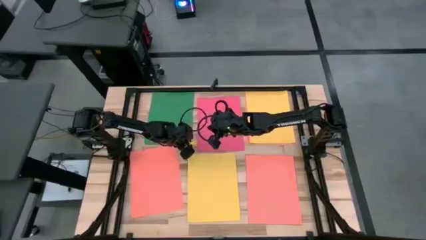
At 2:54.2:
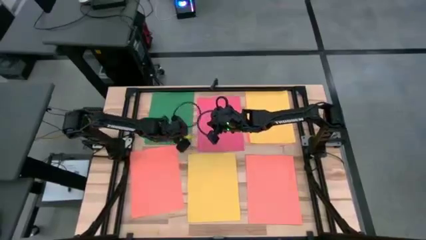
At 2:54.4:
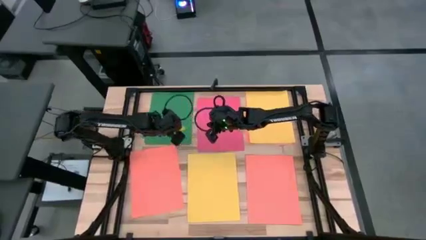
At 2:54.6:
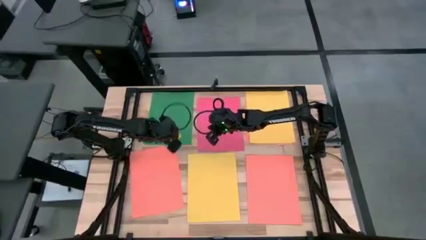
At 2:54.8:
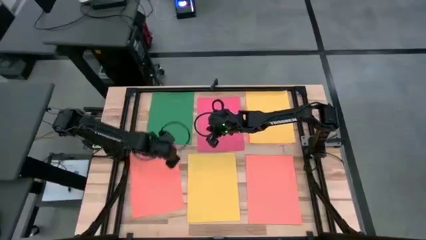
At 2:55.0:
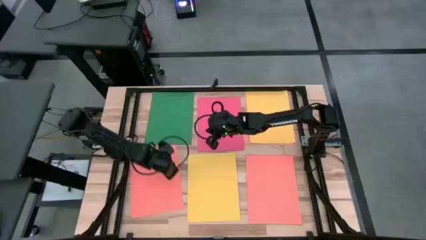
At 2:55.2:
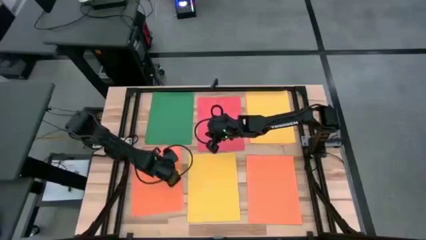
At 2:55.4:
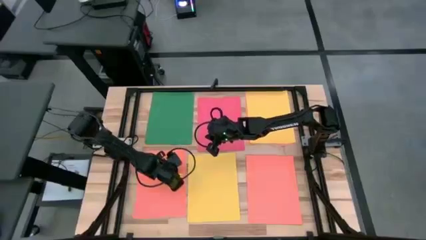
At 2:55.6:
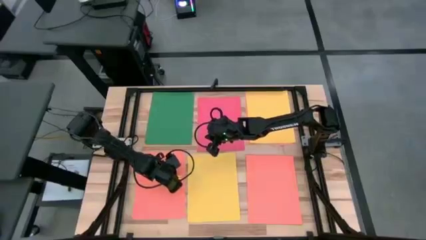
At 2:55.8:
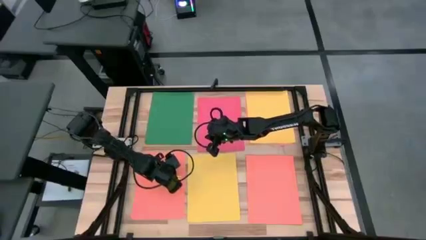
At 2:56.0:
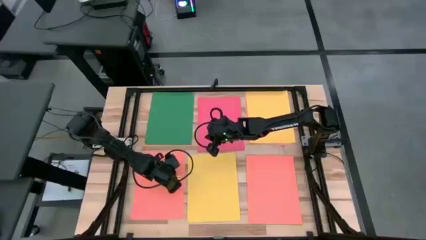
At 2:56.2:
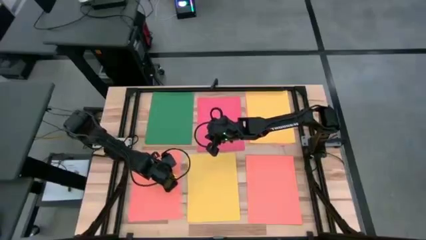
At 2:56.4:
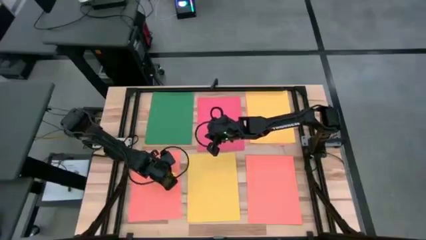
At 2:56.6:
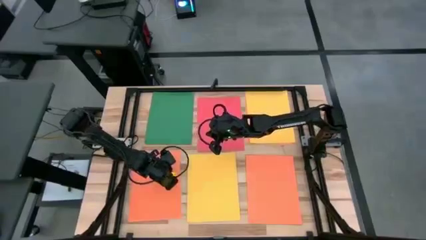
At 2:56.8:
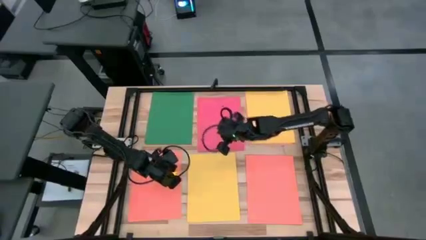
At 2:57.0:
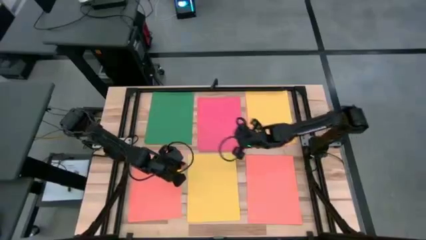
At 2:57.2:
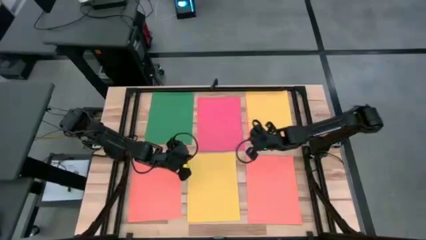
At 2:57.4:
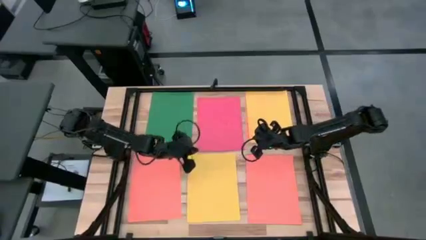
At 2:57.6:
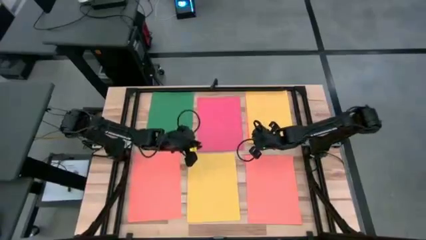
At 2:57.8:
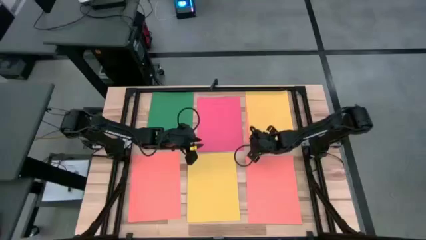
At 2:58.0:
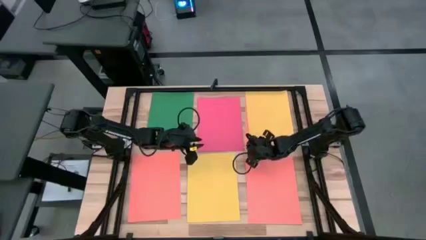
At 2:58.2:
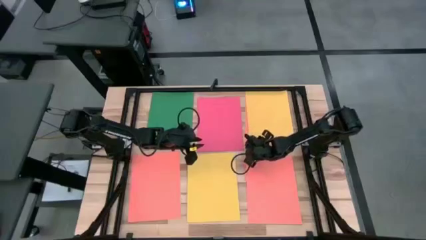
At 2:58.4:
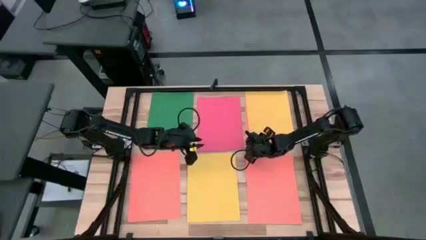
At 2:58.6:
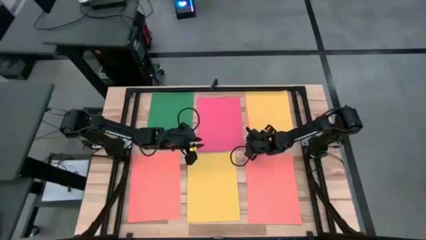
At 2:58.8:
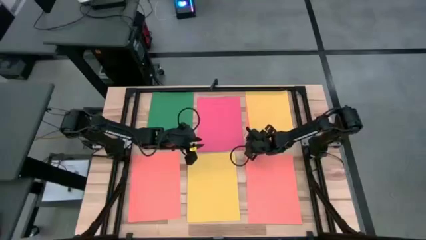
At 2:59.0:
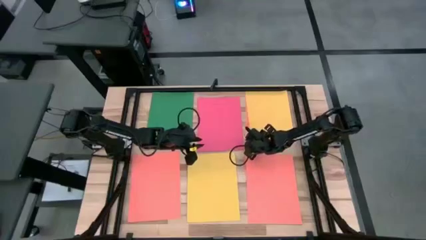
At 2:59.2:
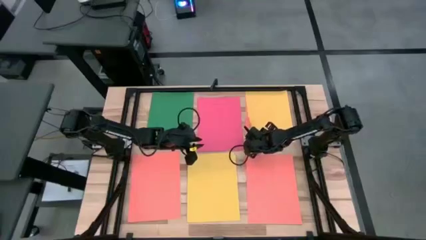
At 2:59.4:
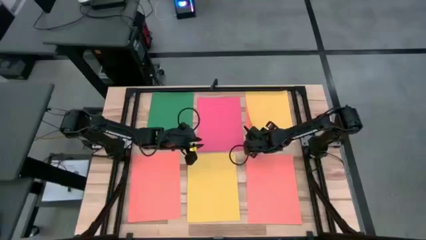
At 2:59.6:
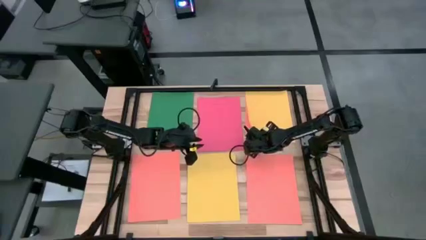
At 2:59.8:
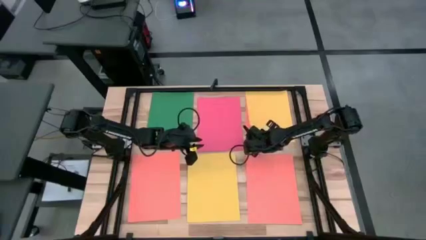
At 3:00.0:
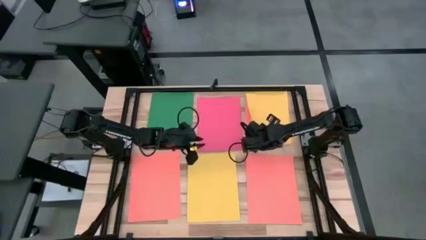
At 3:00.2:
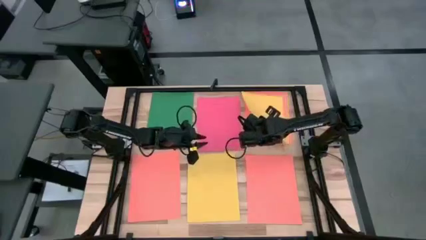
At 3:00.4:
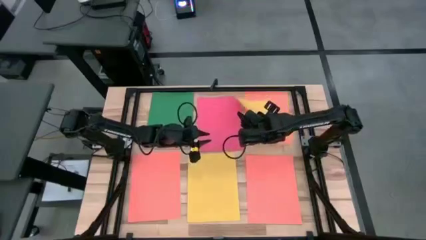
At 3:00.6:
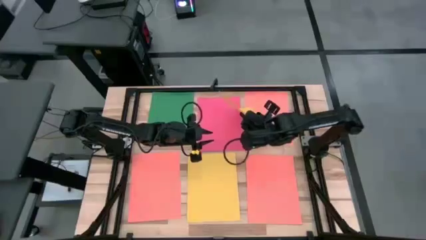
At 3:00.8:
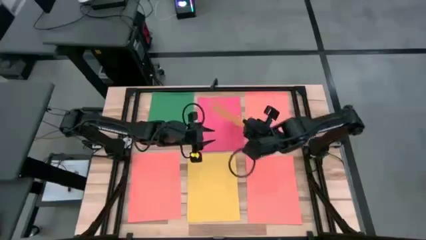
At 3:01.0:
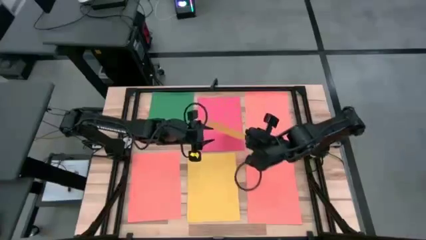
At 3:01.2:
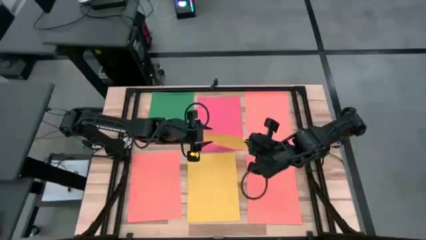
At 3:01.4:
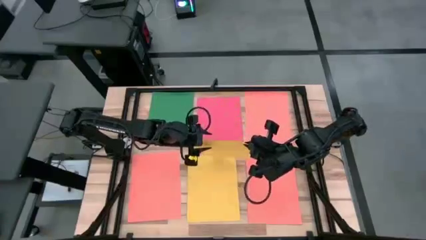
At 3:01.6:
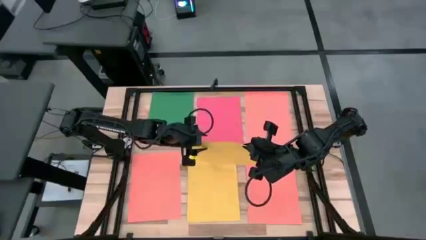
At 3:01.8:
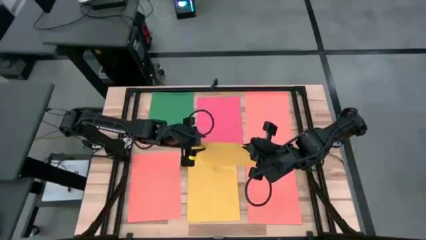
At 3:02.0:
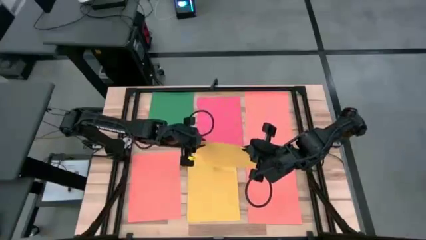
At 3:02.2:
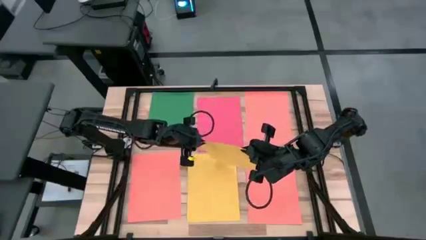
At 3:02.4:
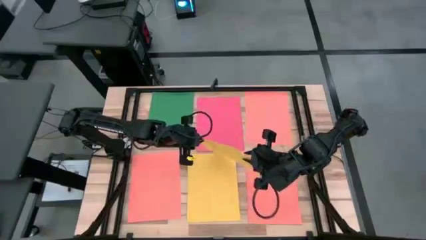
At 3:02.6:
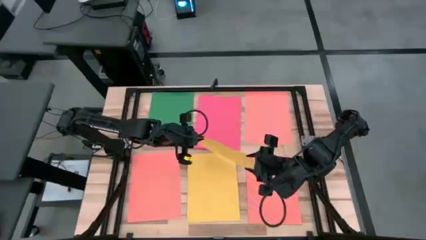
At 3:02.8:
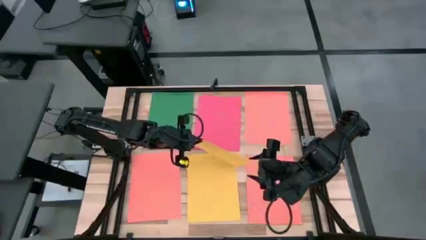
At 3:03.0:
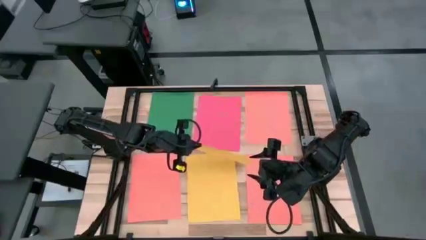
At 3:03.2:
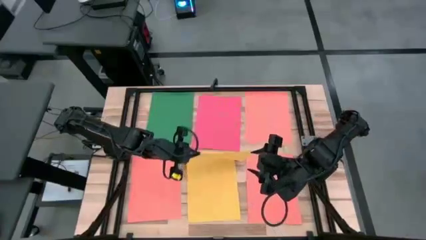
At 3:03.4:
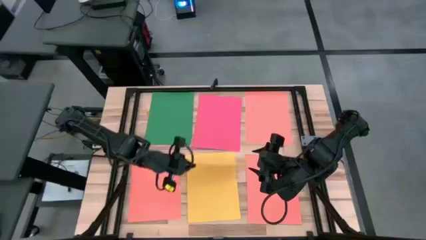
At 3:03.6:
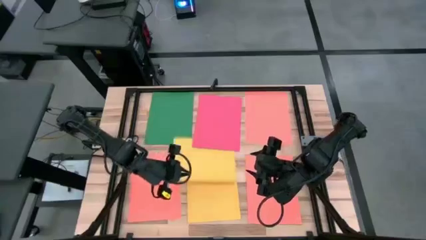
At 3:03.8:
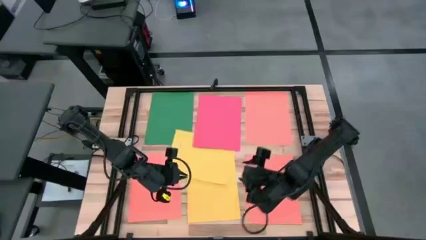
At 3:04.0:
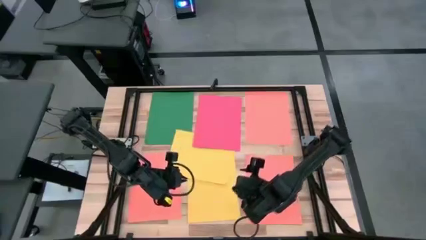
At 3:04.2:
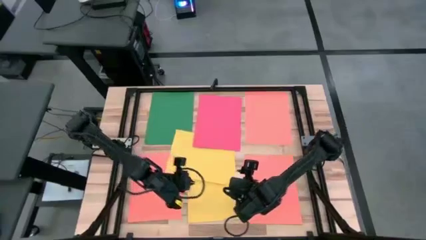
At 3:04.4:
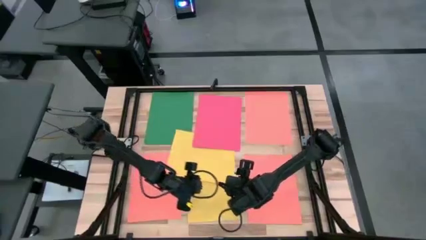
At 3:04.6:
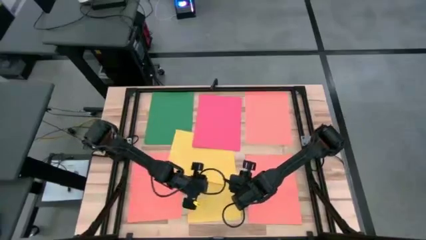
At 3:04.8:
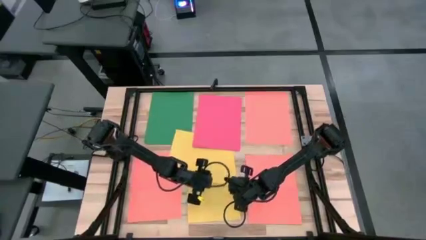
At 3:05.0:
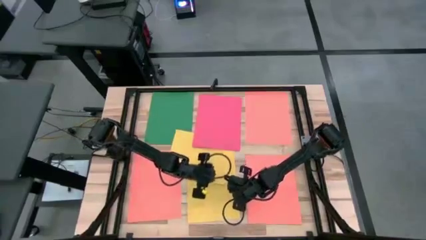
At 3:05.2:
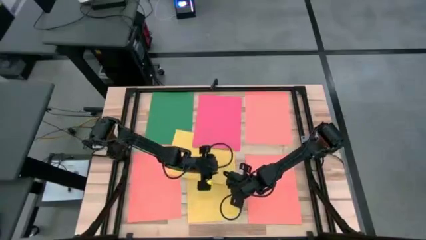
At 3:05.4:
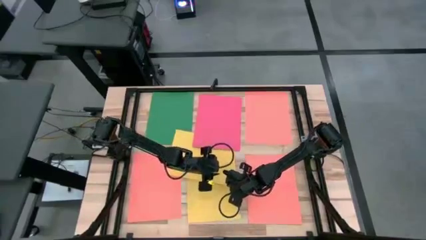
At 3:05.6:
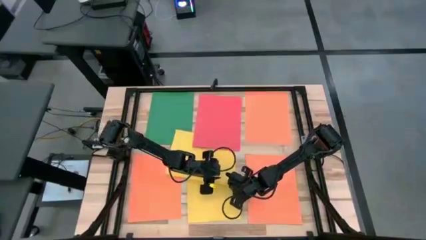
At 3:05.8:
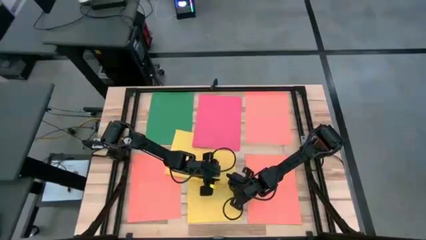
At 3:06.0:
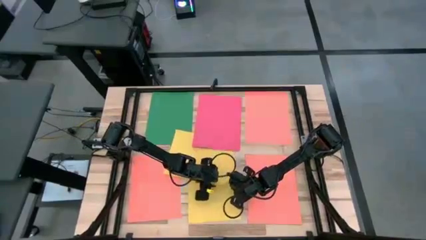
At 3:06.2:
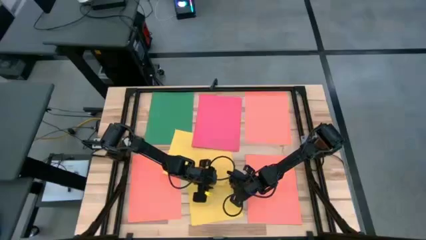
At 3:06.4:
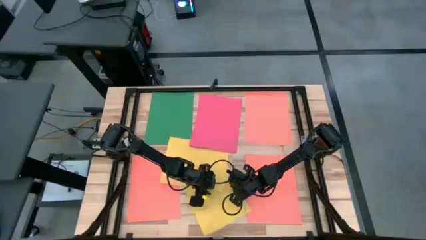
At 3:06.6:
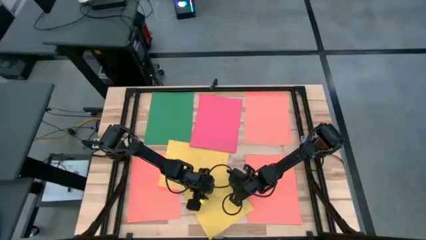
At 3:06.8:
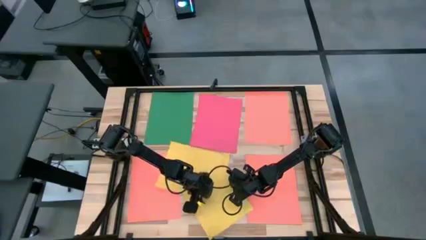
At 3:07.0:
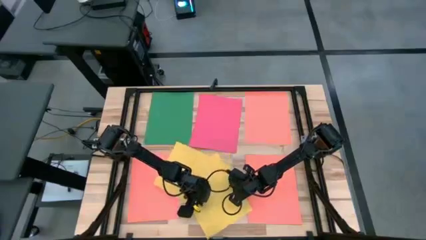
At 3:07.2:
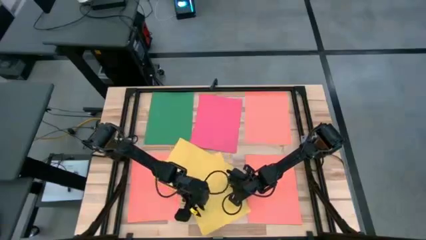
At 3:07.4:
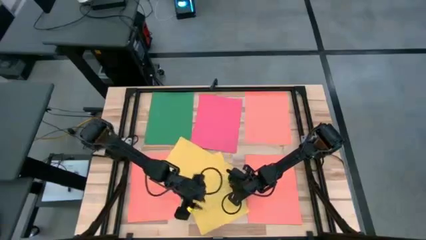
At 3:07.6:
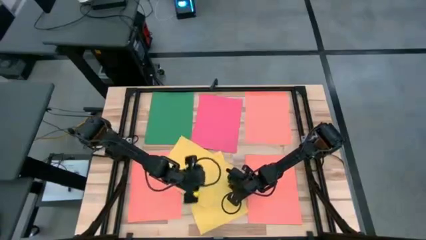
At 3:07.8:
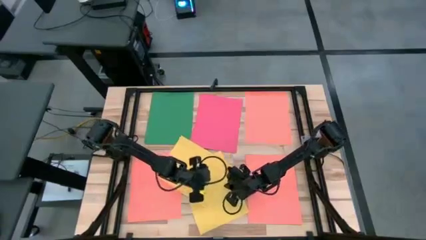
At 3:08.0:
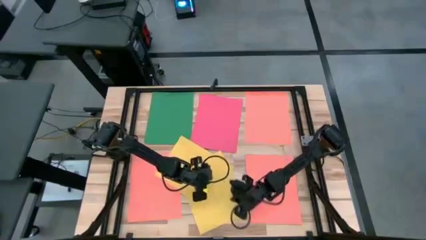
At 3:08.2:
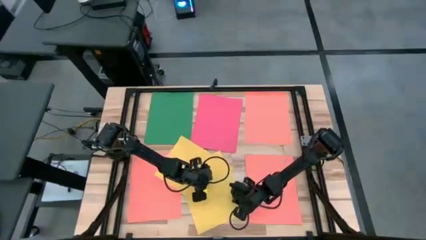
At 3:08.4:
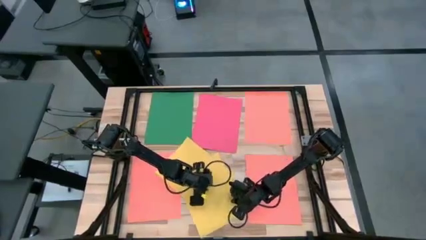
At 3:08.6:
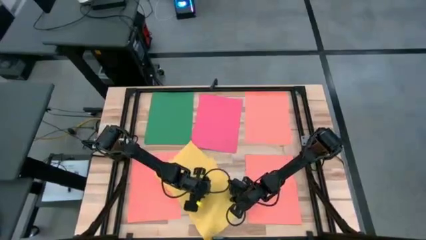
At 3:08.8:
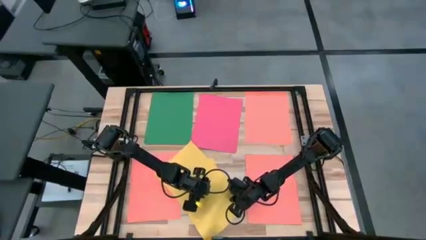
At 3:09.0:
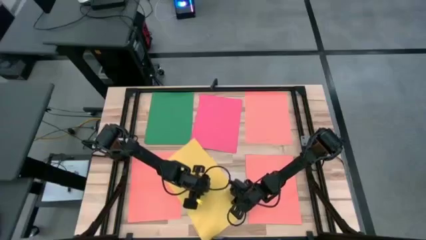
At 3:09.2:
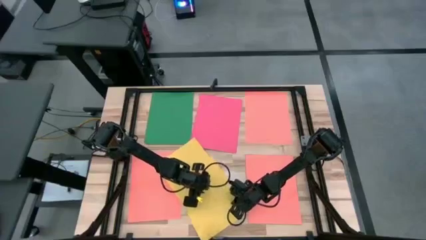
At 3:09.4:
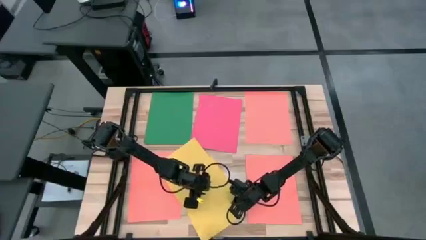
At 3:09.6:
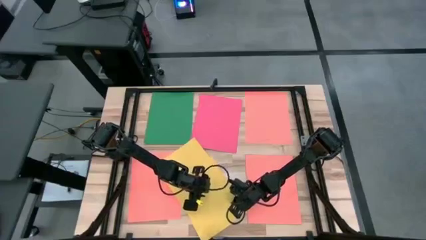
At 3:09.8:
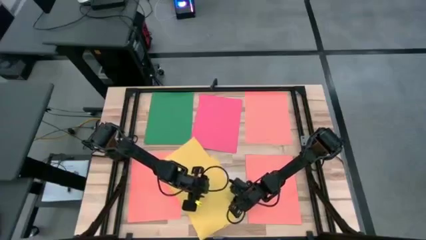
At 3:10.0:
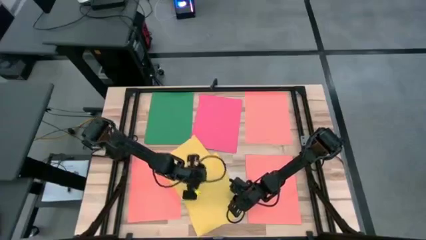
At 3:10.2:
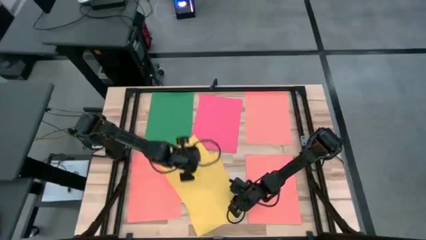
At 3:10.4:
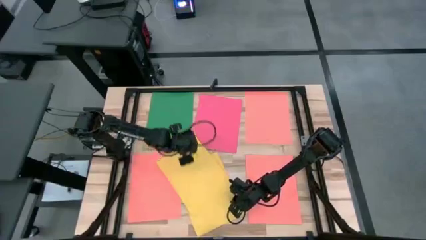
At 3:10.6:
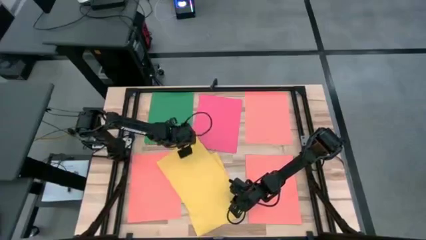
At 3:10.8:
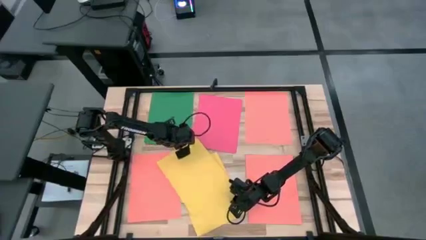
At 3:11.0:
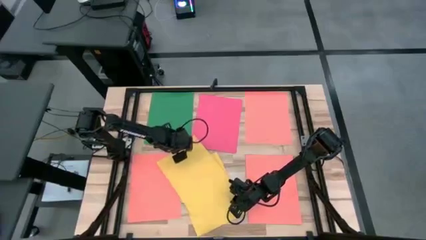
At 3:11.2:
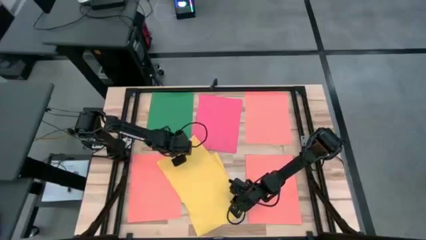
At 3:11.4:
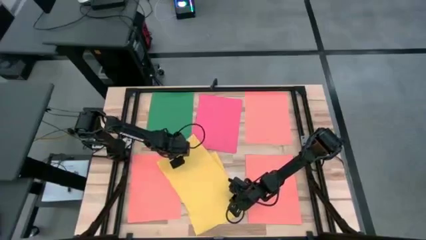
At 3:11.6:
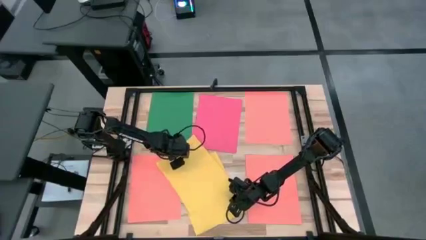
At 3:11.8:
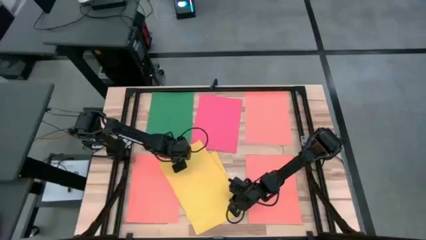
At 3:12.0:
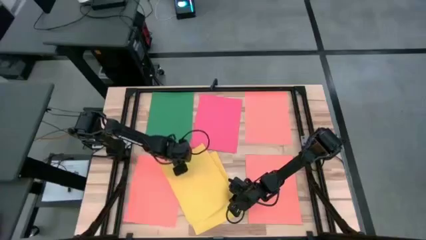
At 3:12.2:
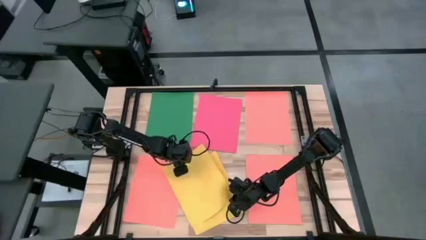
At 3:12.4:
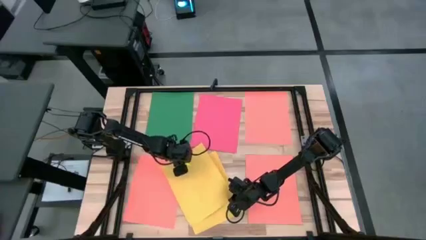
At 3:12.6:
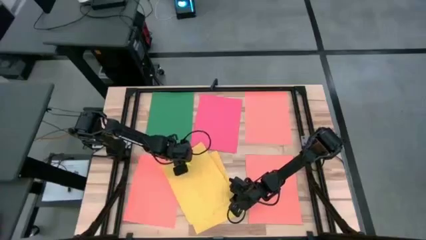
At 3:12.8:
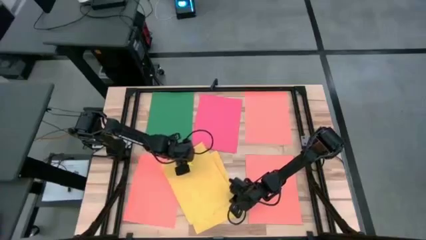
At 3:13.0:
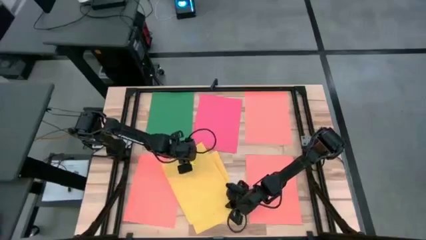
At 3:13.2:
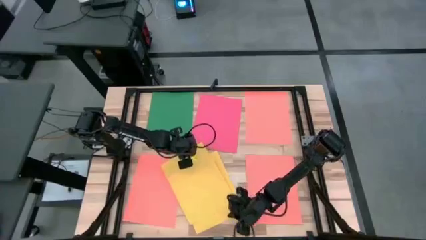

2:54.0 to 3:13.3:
Task: Organize paper
Stack the yellow paper on top of the yellow paper
